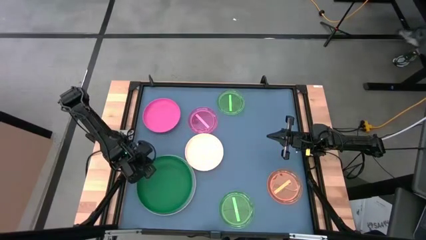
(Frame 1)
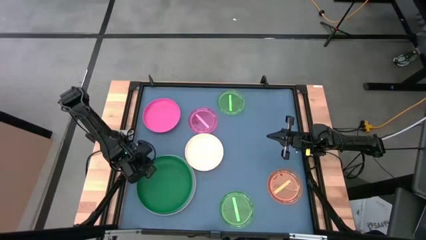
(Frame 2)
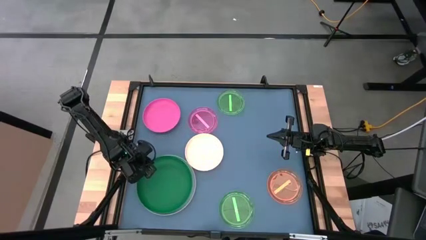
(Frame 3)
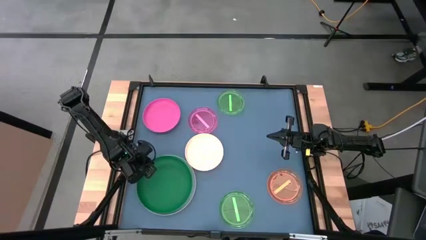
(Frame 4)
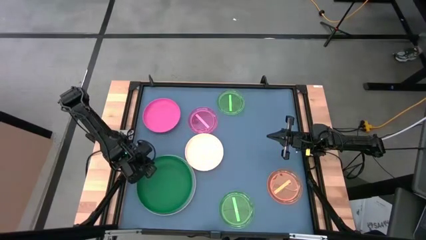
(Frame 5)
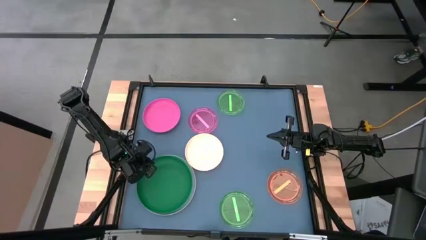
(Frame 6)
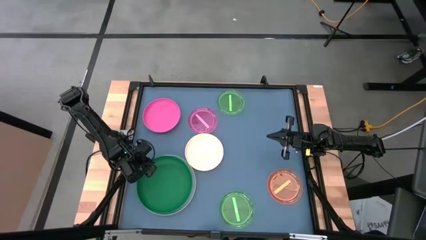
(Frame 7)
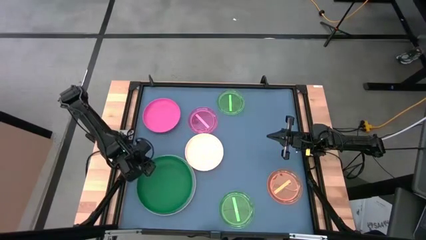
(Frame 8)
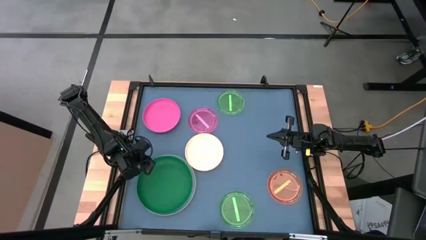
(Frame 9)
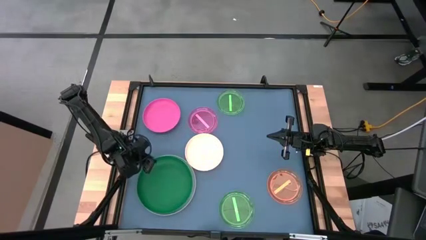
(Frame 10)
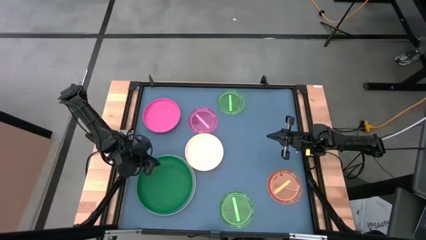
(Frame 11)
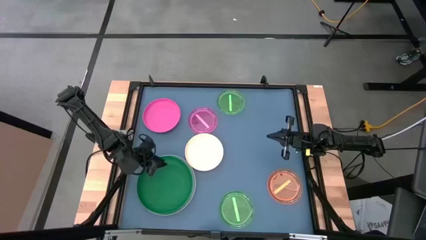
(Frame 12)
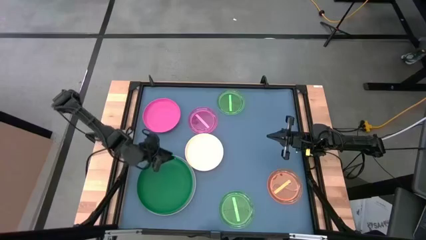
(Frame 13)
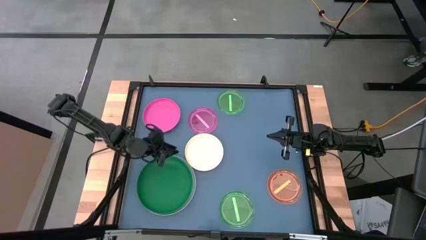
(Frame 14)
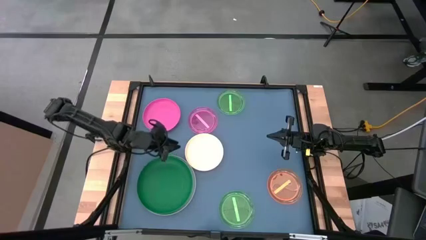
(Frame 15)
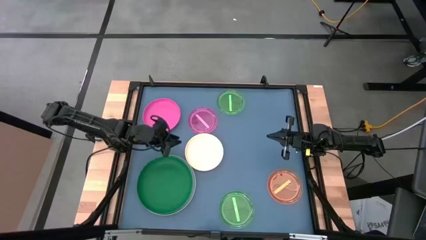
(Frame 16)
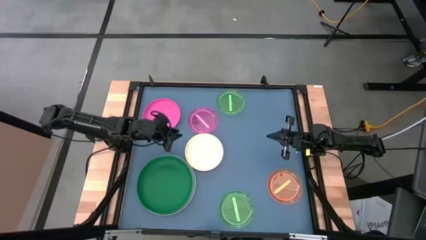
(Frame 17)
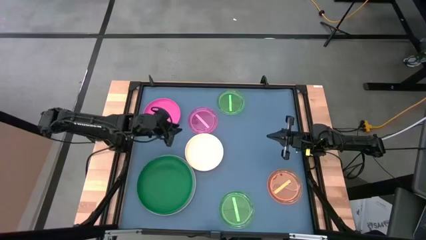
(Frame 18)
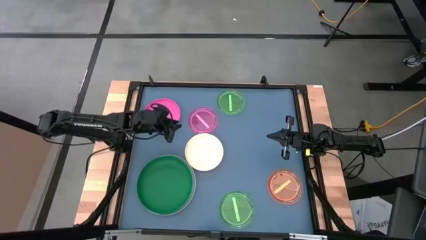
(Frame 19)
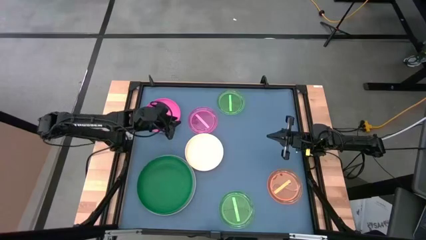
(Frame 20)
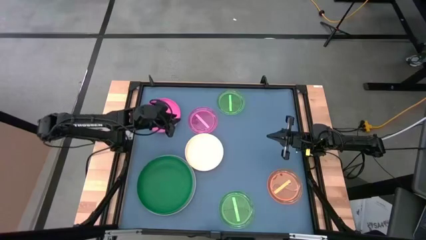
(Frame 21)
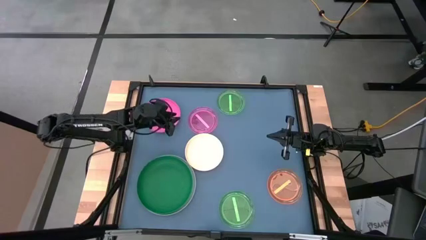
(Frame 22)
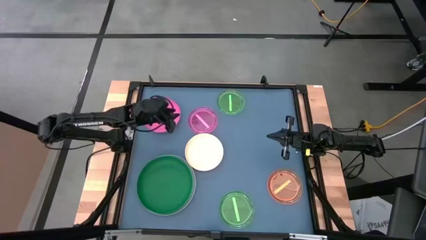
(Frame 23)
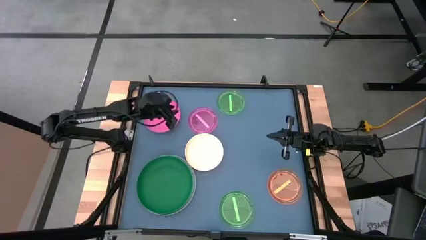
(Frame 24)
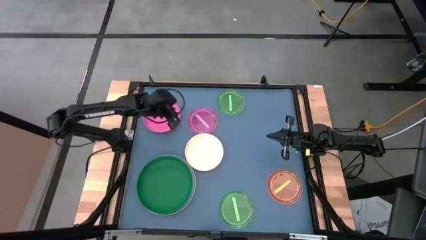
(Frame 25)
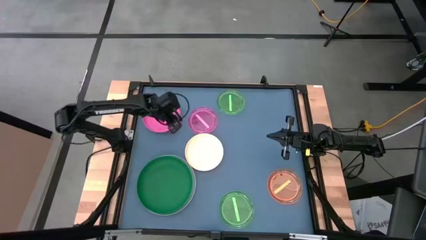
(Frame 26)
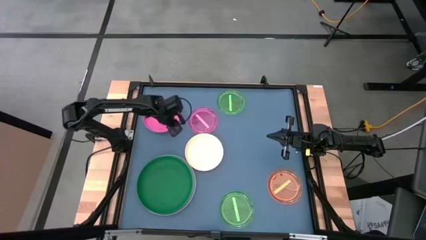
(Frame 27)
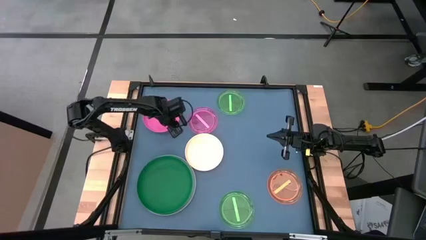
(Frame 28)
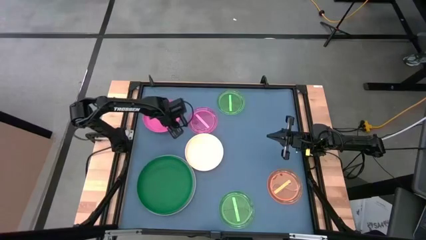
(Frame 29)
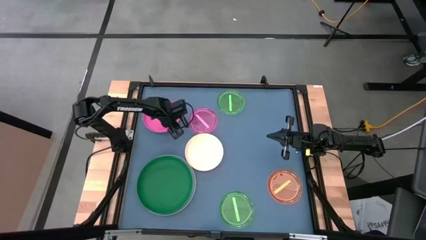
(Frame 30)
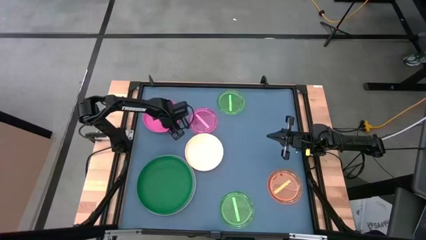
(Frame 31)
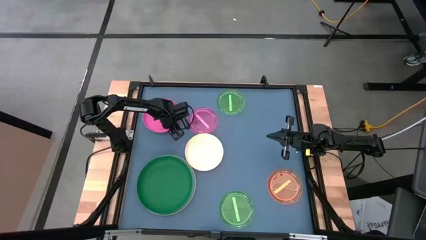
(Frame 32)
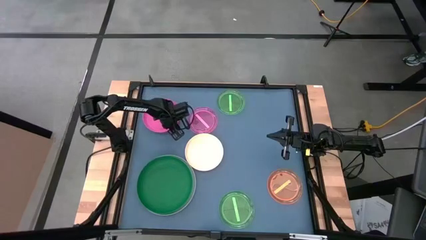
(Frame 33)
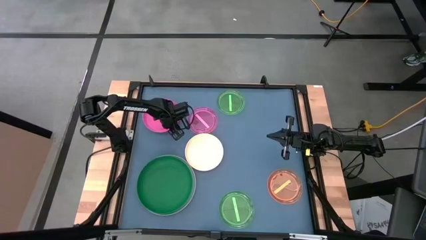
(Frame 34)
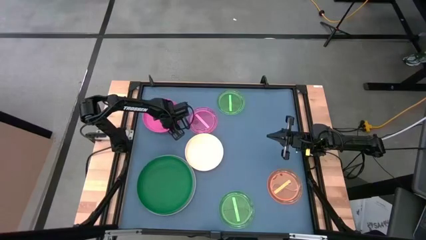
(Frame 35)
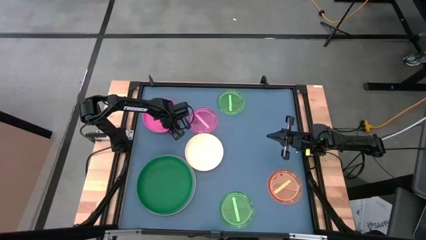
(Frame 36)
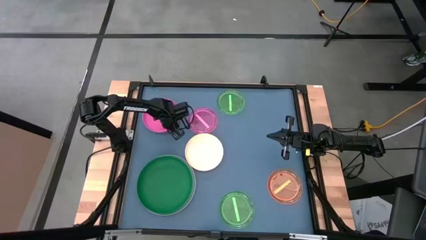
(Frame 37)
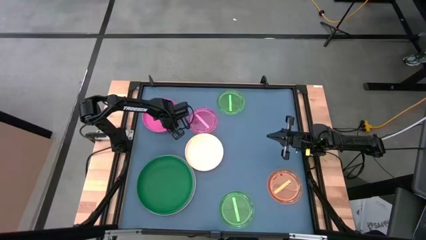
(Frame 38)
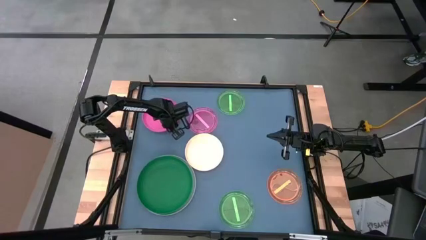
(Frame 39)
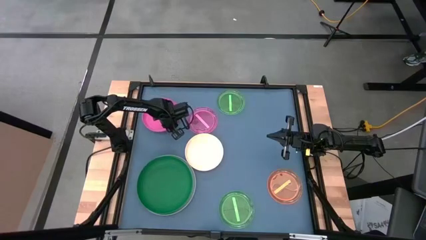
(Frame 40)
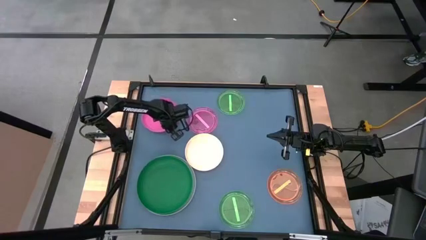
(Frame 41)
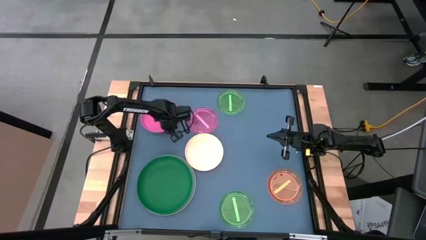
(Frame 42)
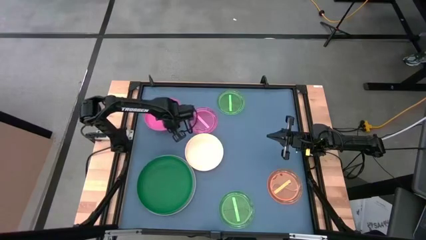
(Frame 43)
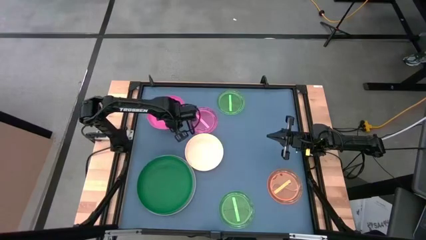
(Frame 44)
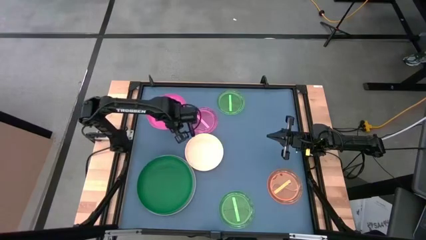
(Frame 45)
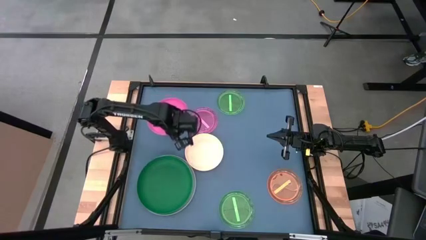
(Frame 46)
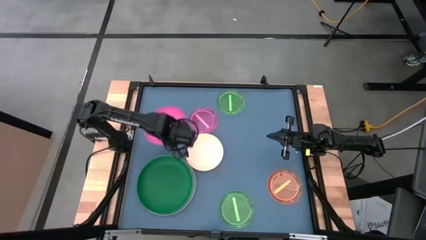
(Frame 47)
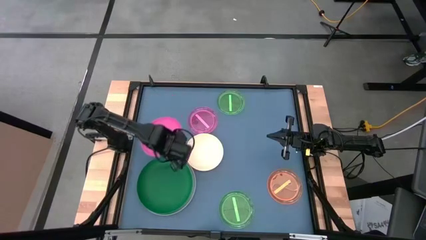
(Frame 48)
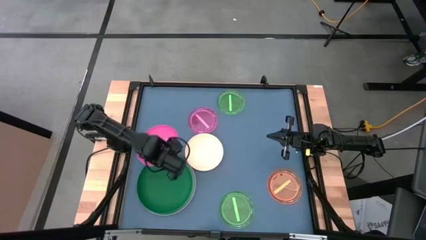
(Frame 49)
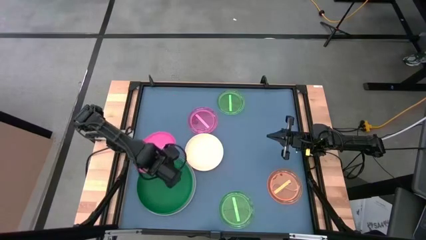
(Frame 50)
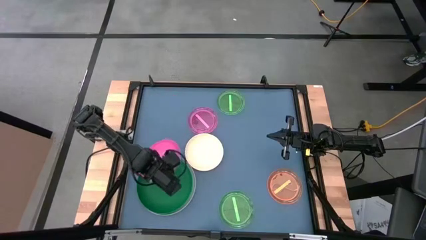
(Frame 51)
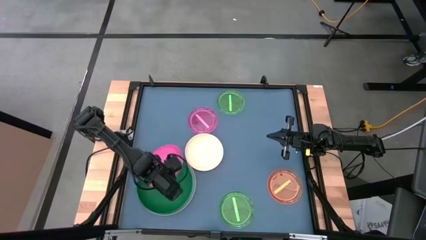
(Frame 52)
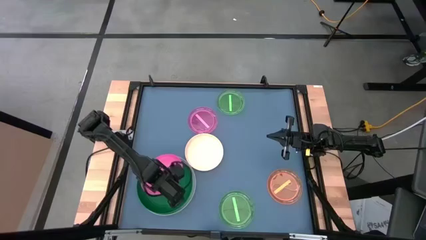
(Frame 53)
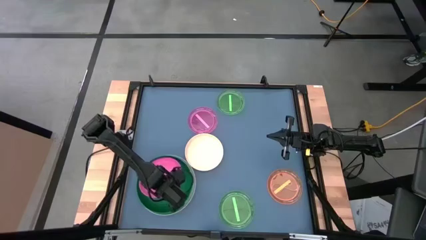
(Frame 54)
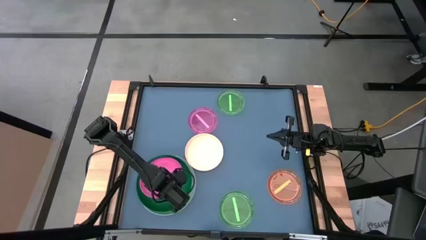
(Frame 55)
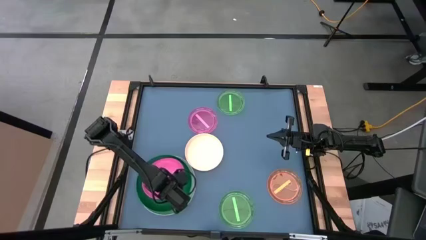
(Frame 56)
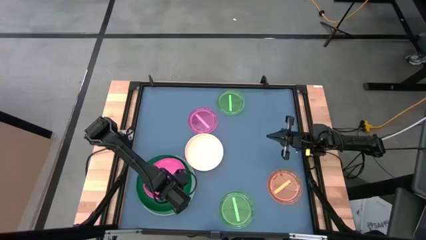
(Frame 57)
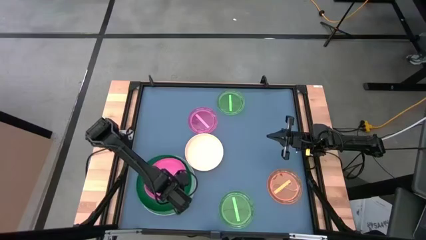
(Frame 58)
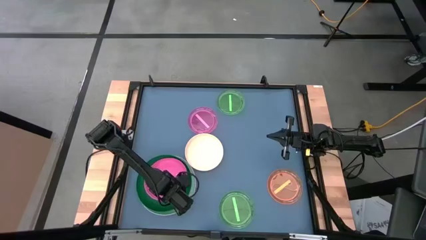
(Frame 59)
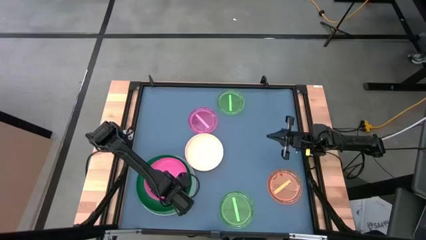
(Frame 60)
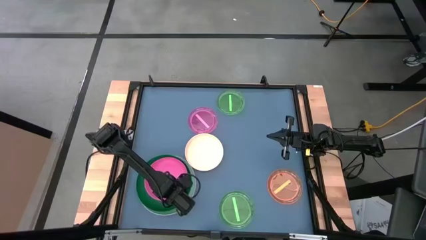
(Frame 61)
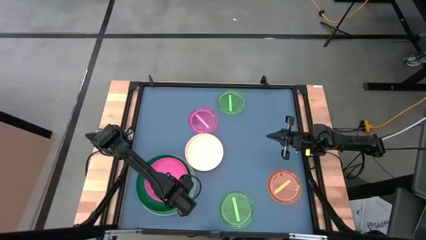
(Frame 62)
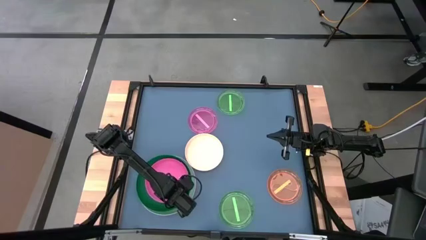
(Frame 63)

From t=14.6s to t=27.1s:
Task: Stack plastic plates
Stack the dark pink plate on top of the dark green plate
